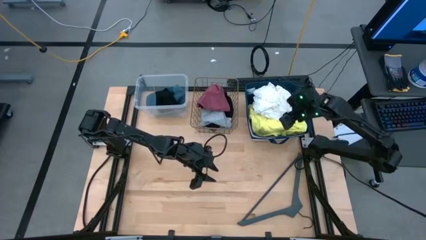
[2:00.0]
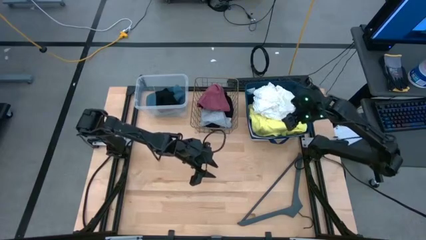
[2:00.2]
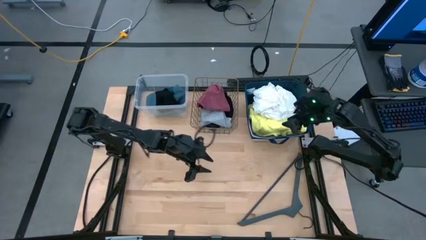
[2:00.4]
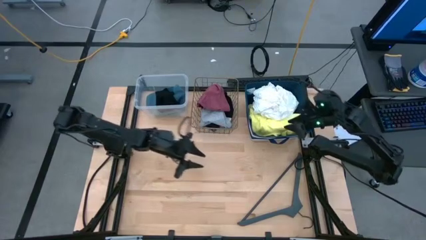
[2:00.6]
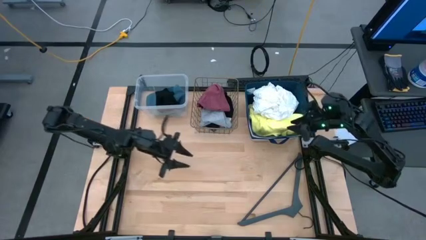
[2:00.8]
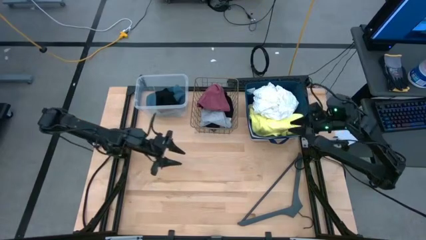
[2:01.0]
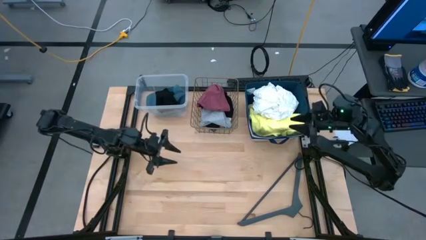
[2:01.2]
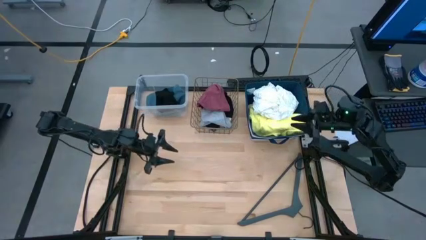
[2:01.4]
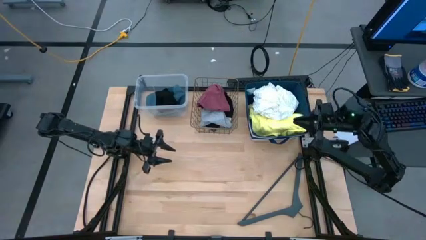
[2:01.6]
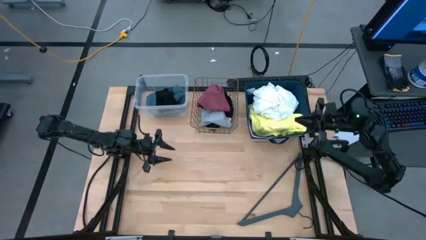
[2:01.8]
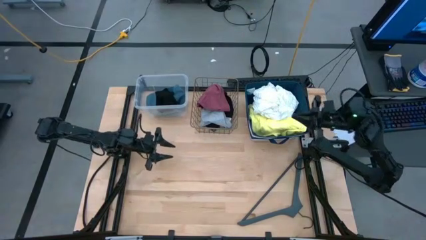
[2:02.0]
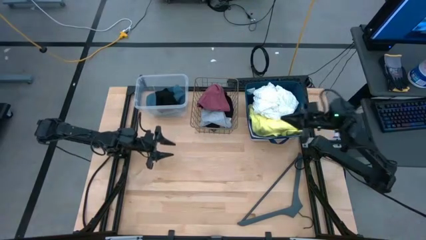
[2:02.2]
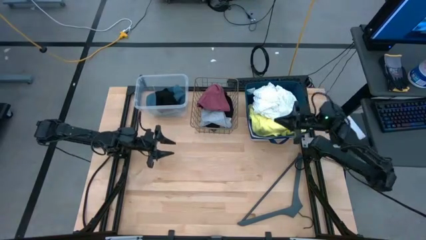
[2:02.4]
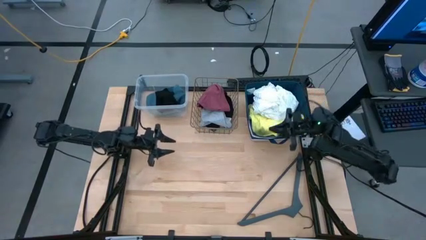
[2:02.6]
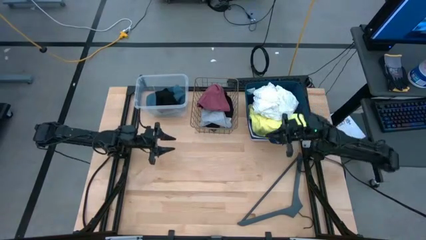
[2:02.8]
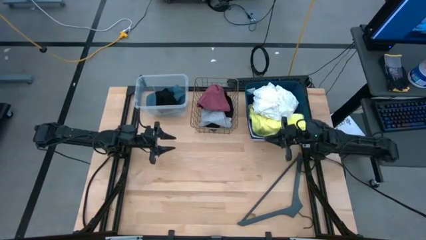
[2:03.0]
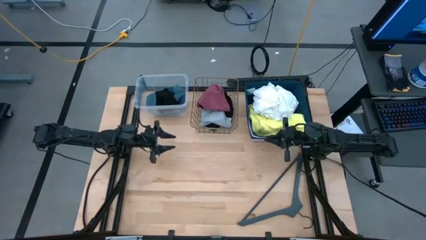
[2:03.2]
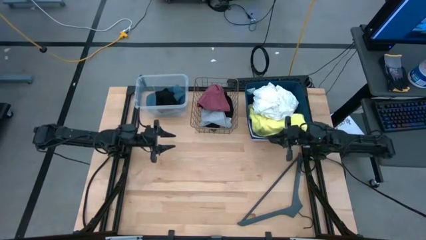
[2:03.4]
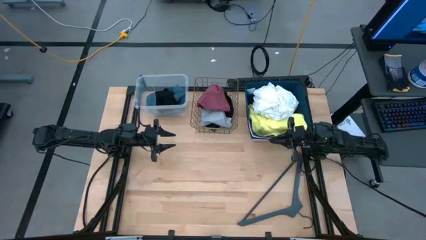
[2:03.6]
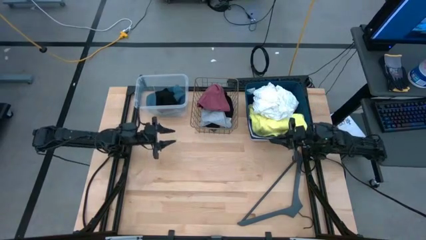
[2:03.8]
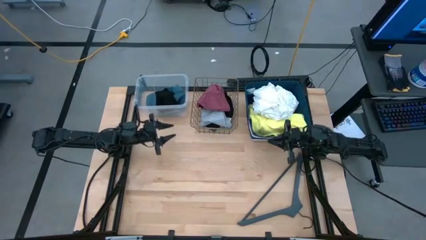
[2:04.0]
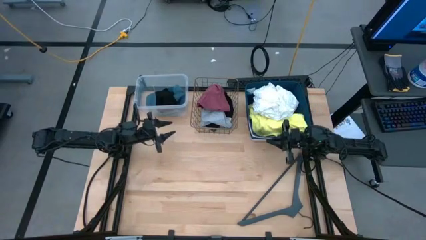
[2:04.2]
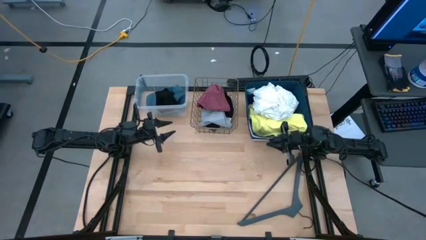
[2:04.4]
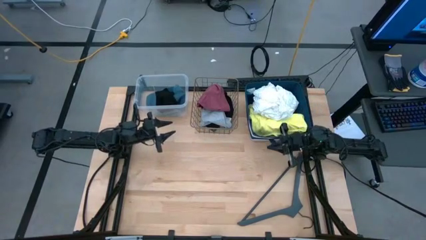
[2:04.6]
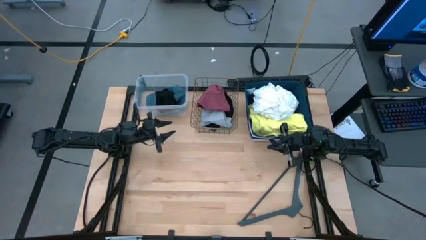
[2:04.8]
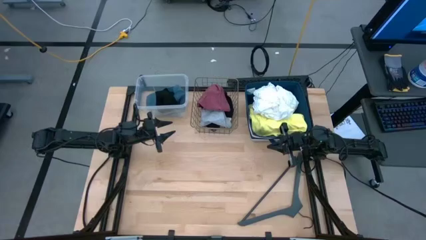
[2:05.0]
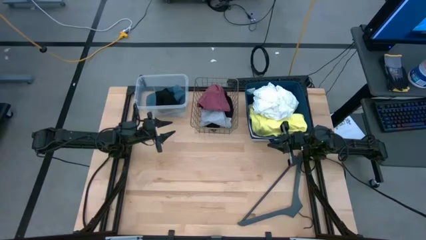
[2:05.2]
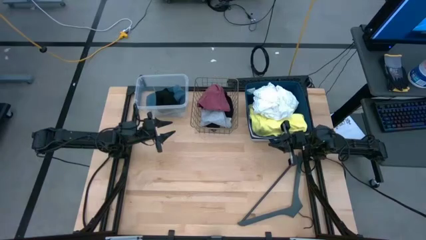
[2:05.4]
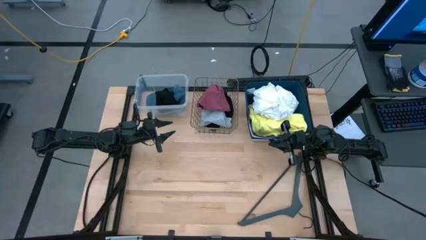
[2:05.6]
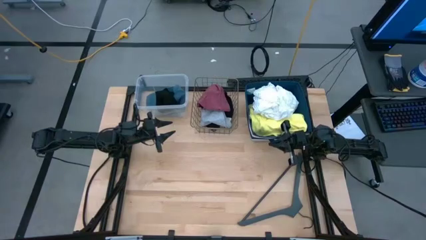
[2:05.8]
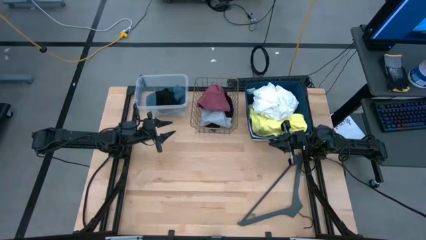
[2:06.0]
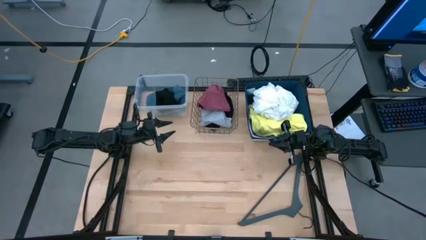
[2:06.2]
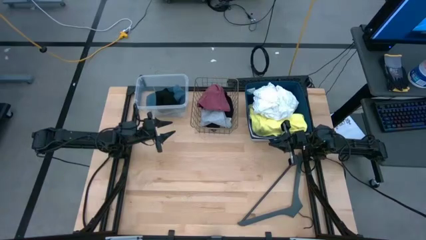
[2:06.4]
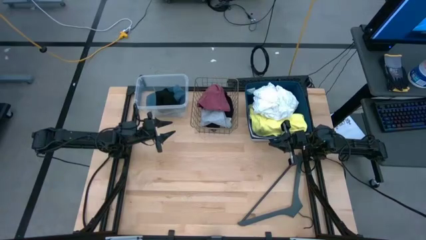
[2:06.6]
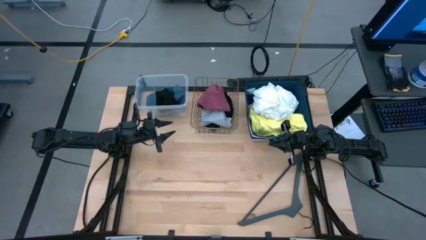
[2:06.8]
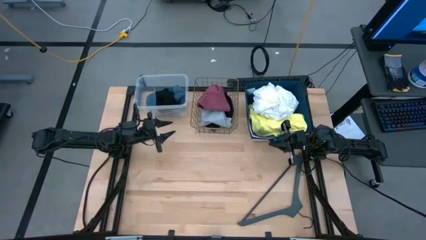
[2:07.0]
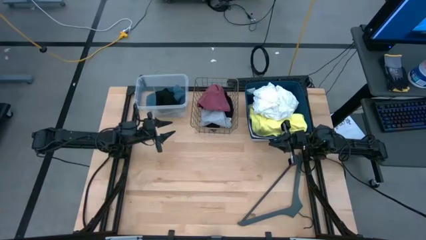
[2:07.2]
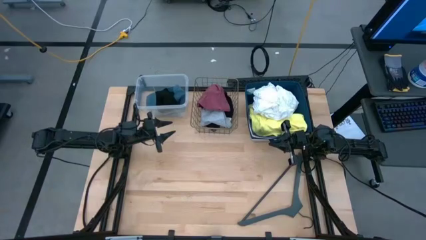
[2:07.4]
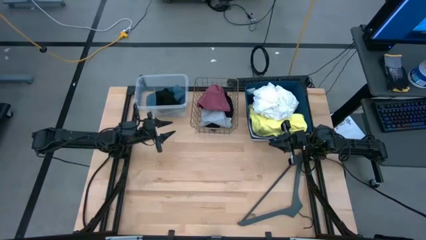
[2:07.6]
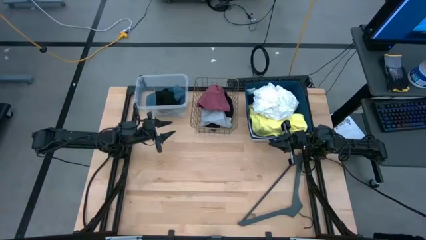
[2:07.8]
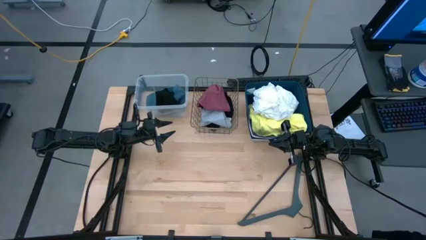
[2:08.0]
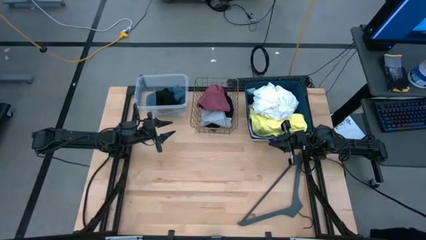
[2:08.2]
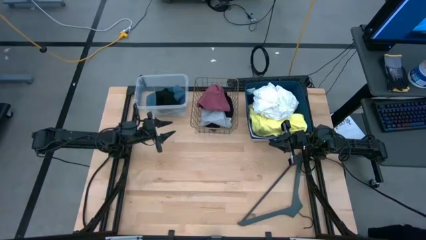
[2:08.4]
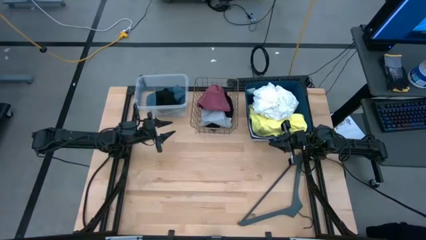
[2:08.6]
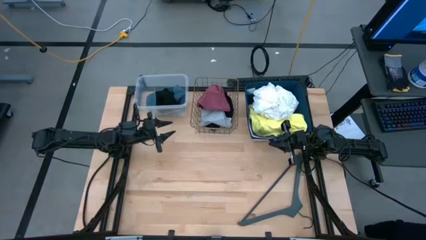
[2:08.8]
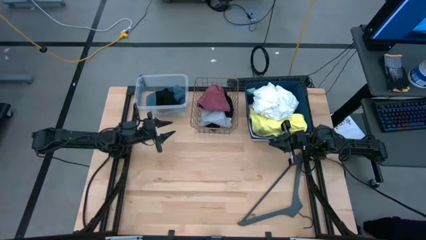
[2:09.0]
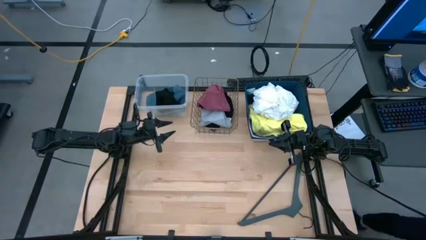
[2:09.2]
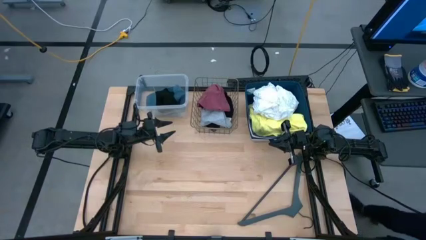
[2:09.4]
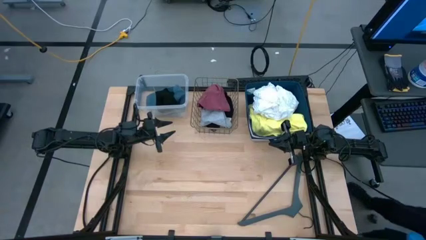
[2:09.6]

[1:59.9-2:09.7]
Task: Pick & Place Cloths
Return to Home Position

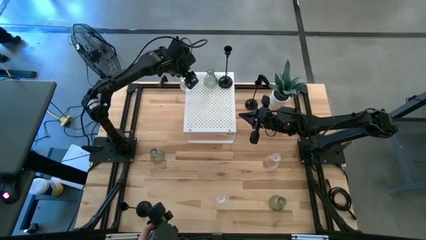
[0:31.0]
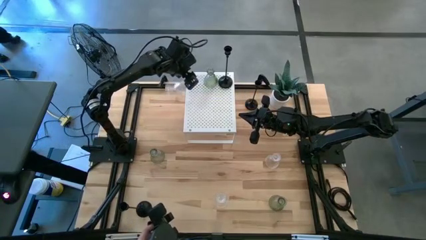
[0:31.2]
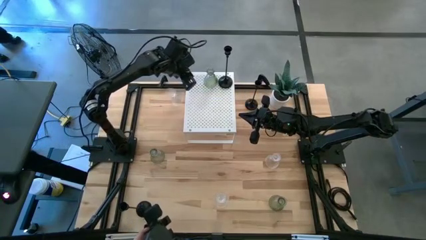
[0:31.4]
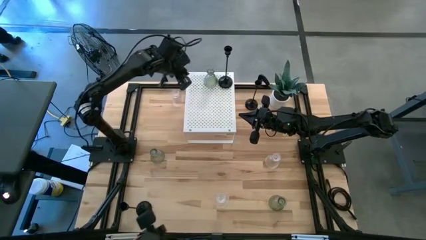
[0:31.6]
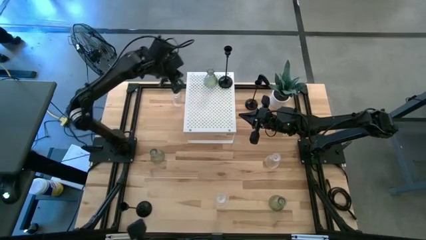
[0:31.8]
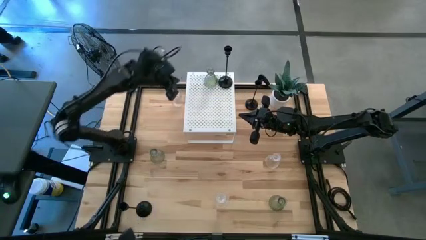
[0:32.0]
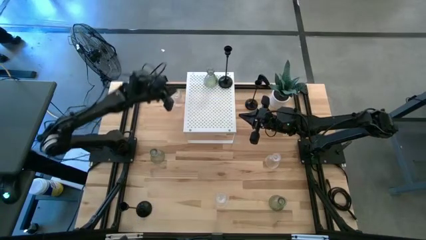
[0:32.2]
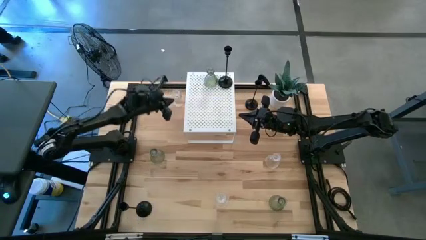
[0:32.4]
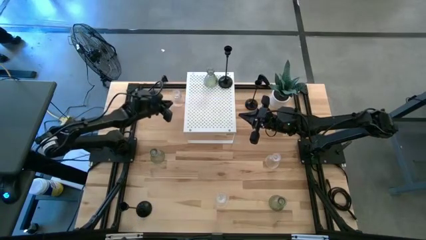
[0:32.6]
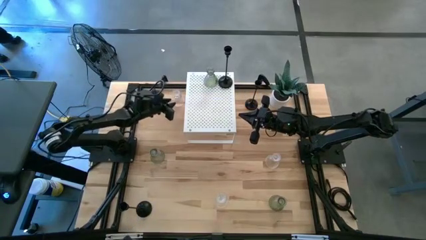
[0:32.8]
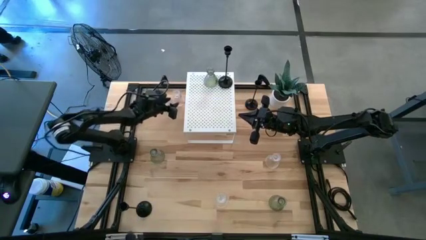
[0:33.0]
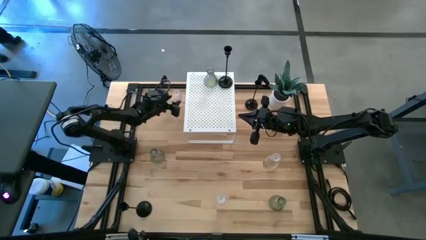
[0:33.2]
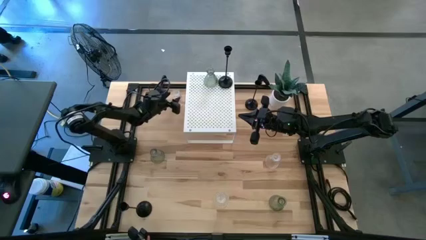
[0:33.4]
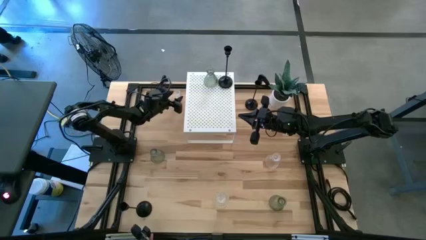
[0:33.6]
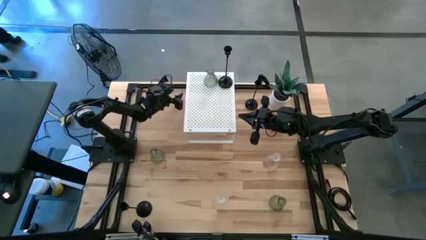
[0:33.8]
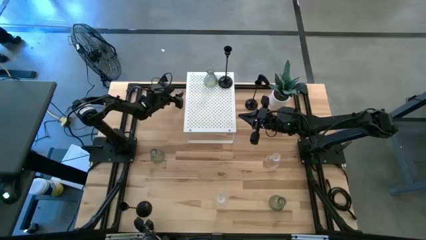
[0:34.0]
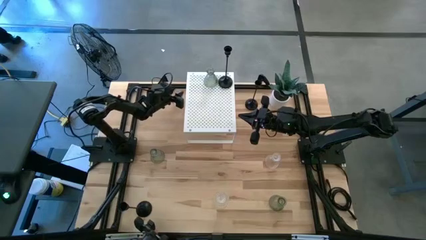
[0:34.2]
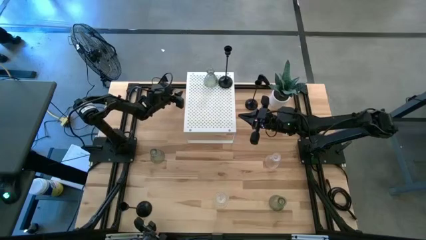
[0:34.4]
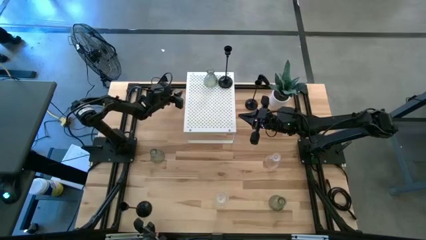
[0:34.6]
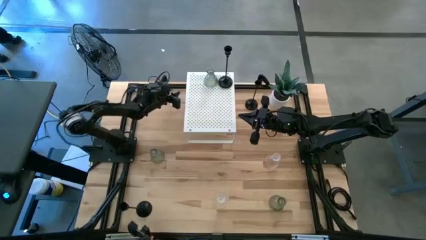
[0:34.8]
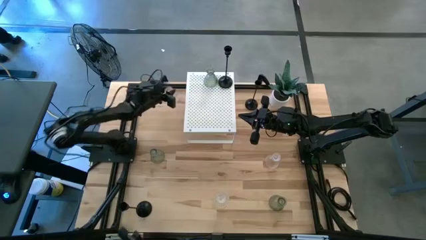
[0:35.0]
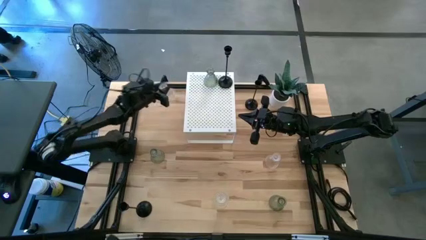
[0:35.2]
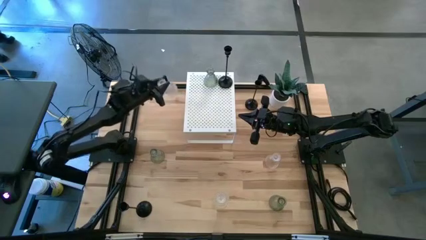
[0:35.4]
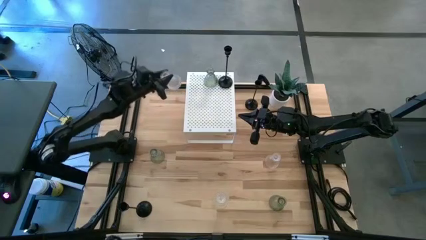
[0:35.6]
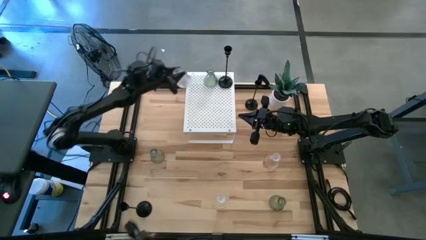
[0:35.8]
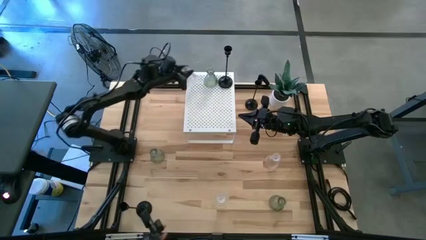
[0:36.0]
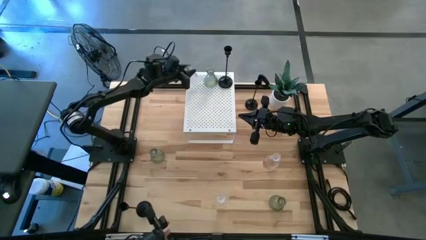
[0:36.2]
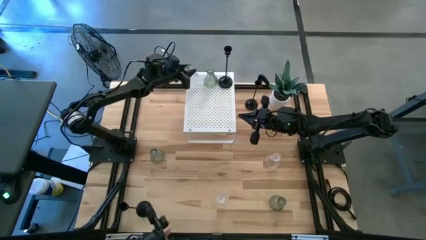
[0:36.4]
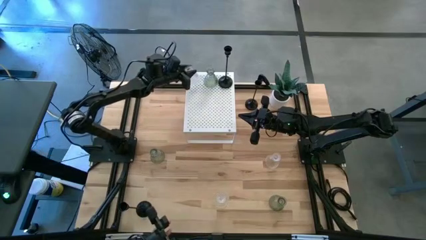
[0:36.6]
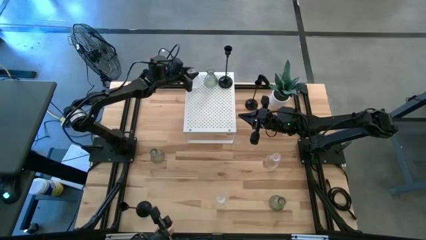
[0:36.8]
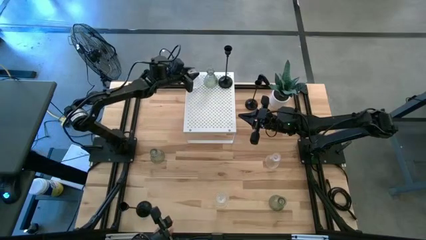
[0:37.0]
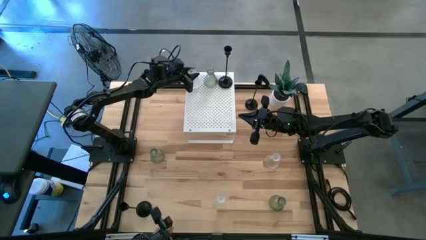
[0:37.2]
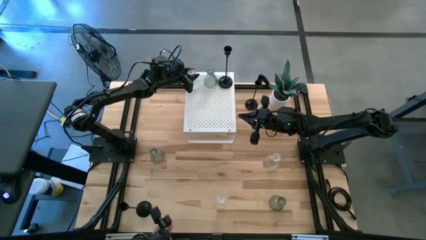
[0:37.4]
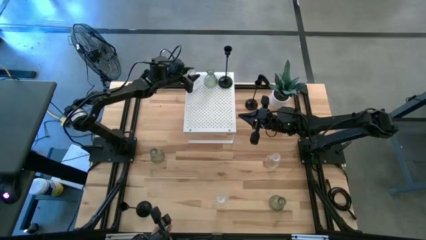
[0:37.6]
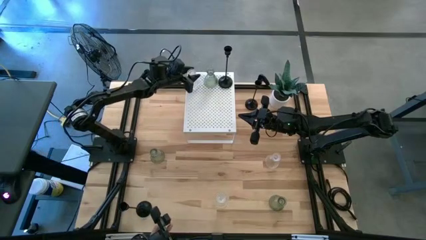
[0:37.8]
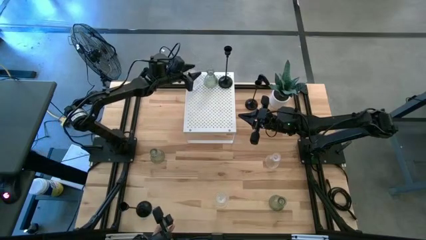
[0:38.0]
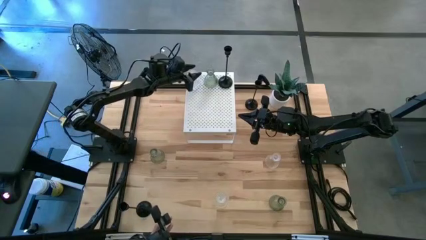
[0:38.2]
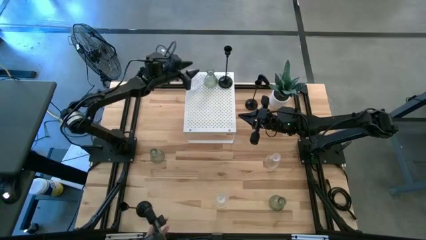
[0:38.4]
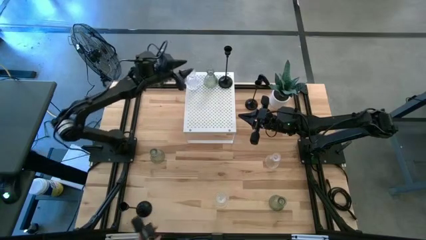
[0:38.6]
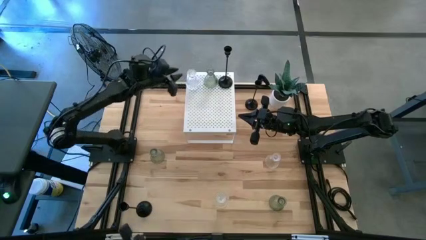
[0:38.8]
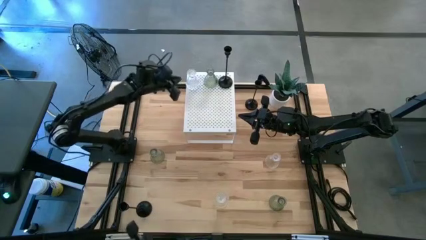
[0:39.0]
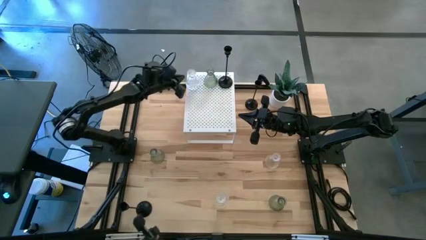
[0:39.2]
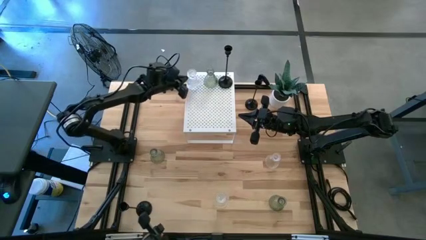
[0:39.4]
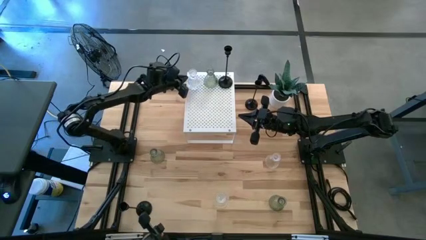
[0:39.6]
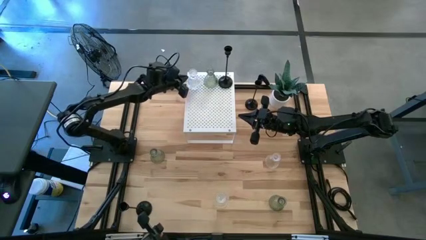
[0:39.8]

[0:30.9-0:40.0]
Task: Pick & Place candle stick holders
Put the top left transparent glass candle holder on the shelf
